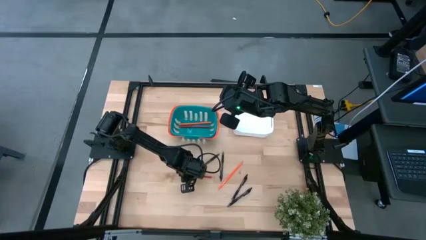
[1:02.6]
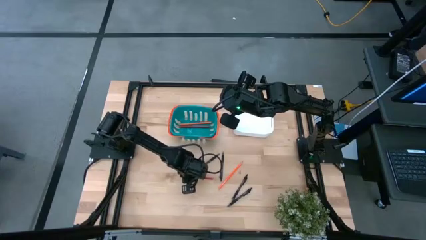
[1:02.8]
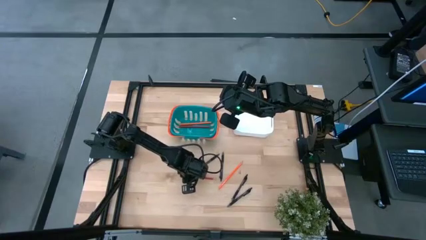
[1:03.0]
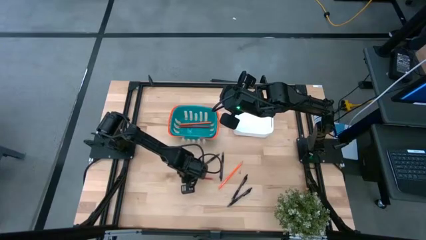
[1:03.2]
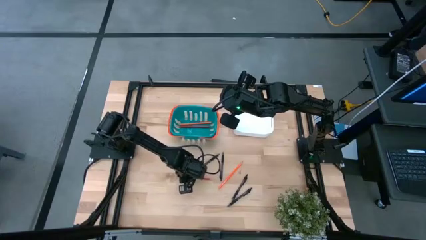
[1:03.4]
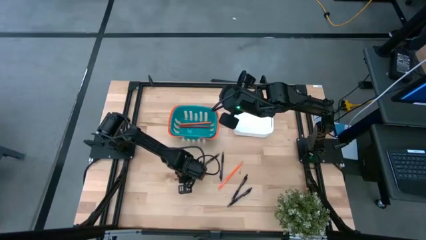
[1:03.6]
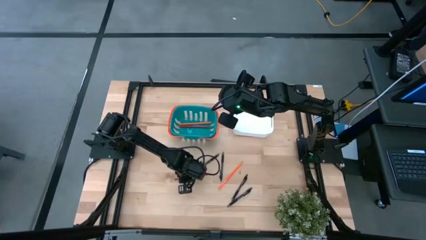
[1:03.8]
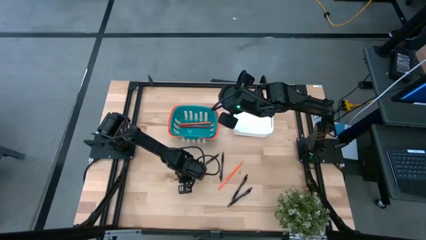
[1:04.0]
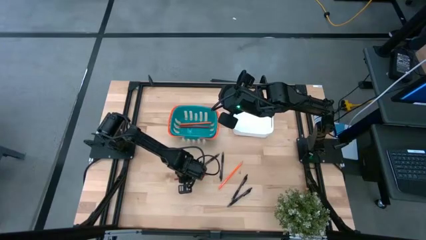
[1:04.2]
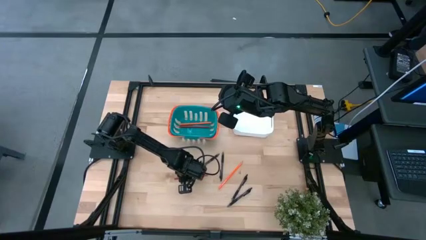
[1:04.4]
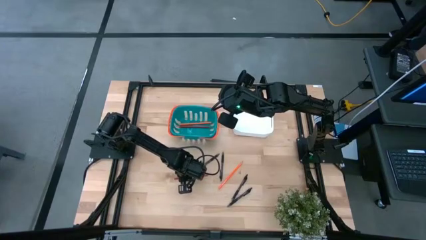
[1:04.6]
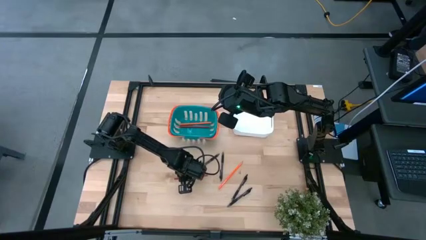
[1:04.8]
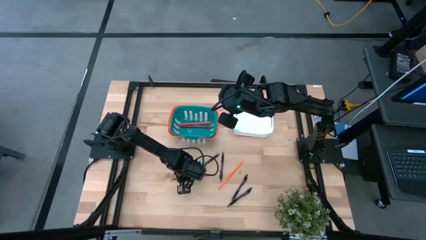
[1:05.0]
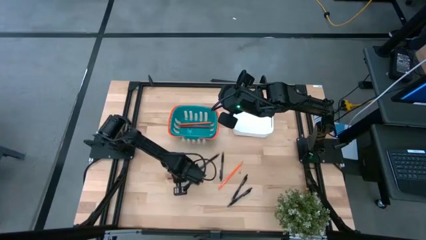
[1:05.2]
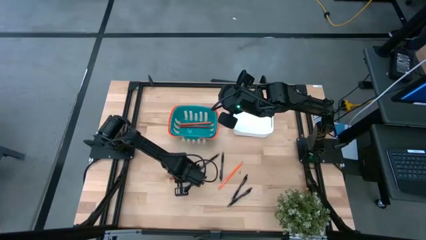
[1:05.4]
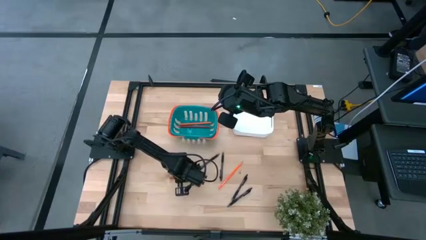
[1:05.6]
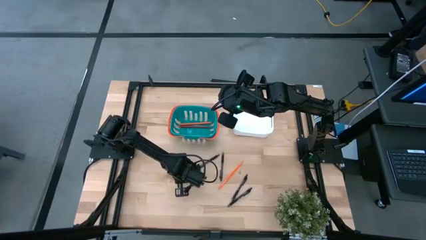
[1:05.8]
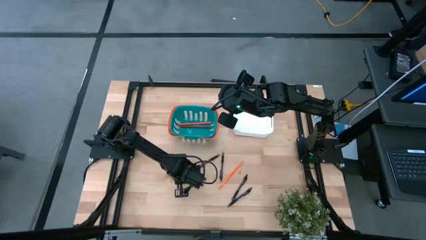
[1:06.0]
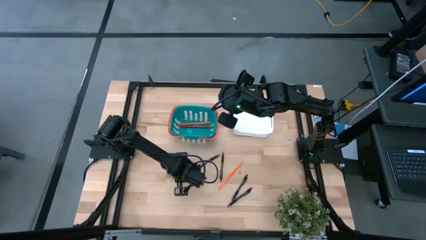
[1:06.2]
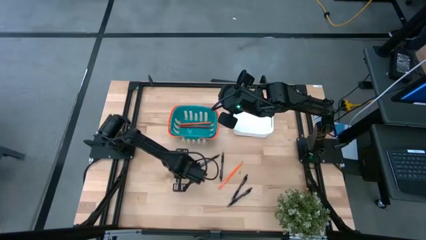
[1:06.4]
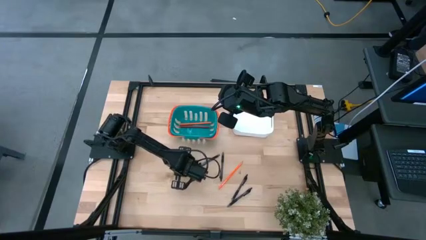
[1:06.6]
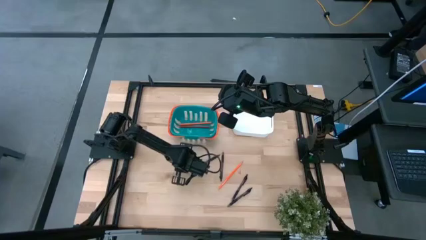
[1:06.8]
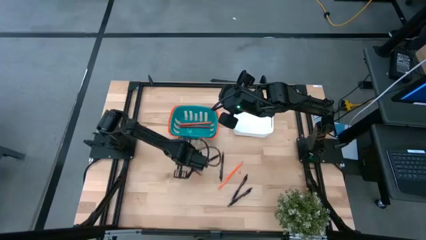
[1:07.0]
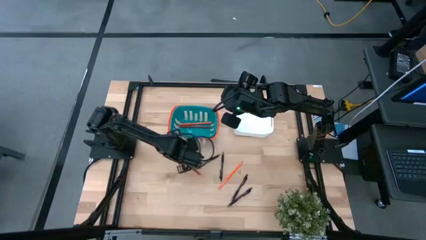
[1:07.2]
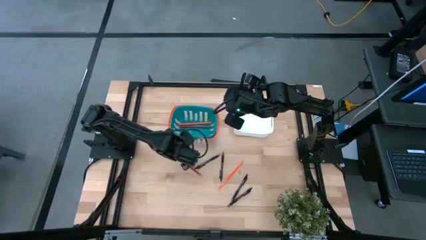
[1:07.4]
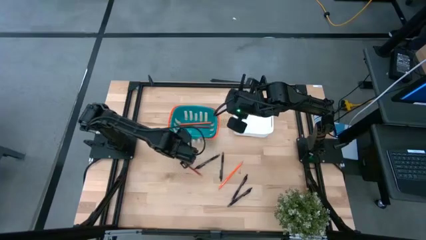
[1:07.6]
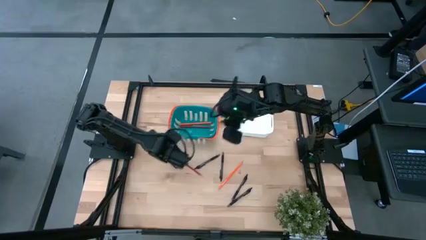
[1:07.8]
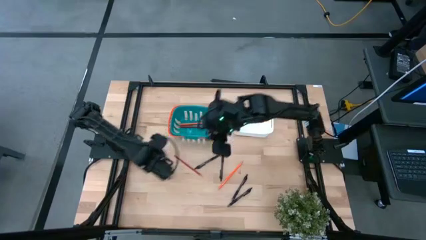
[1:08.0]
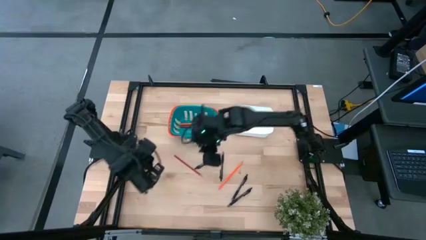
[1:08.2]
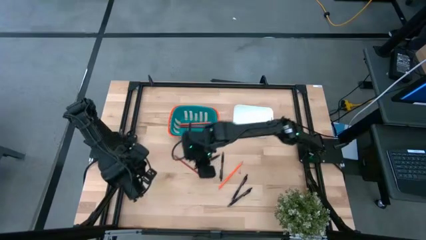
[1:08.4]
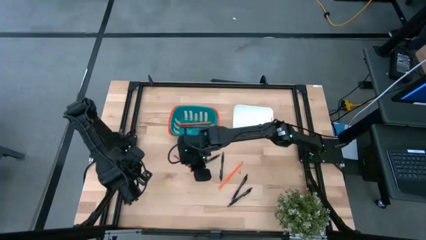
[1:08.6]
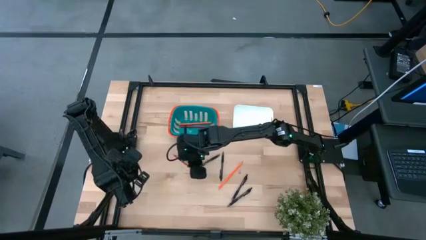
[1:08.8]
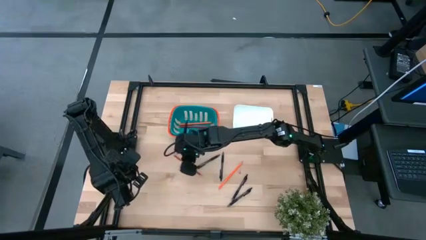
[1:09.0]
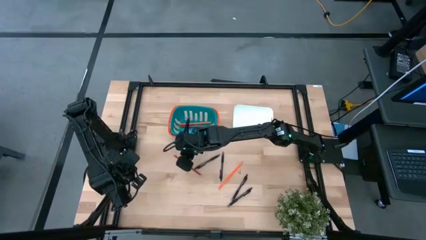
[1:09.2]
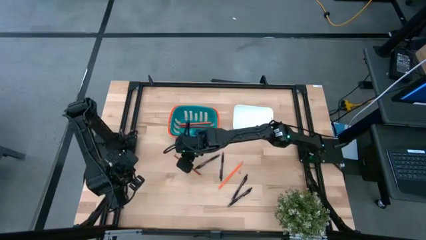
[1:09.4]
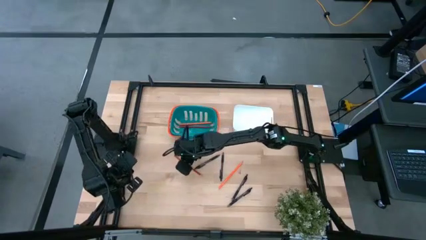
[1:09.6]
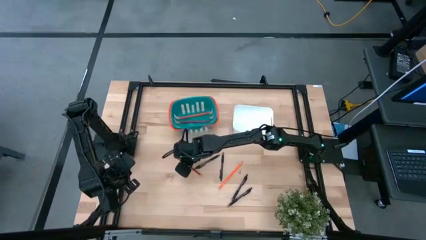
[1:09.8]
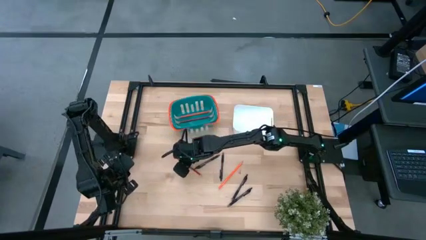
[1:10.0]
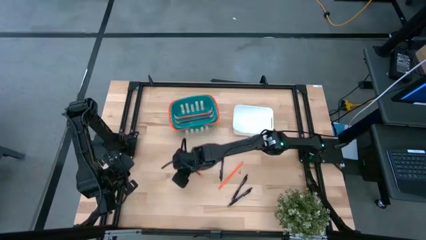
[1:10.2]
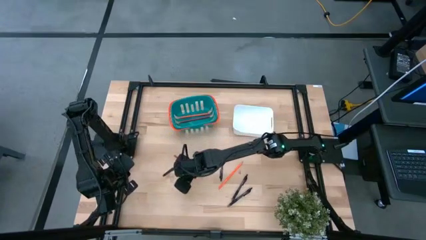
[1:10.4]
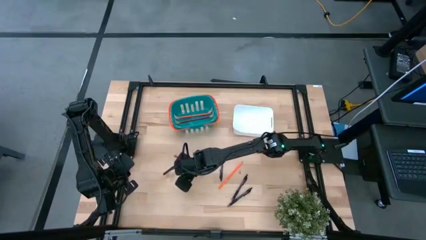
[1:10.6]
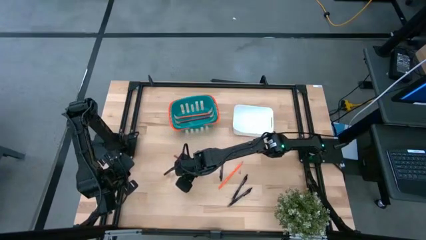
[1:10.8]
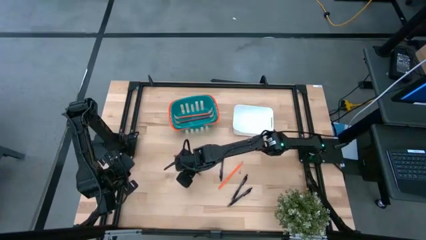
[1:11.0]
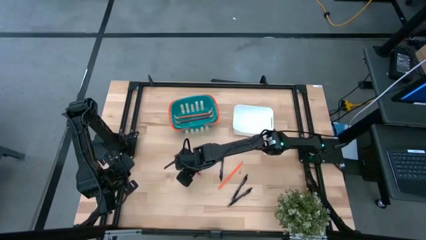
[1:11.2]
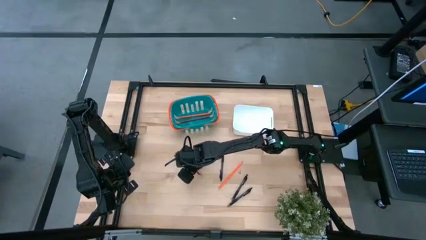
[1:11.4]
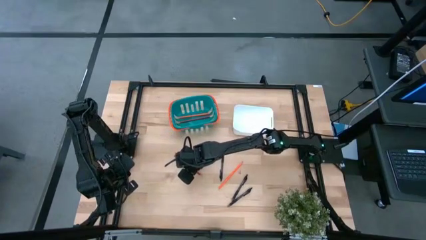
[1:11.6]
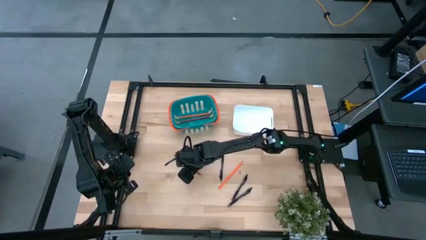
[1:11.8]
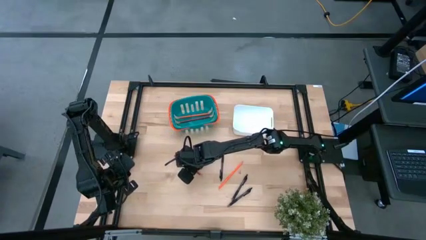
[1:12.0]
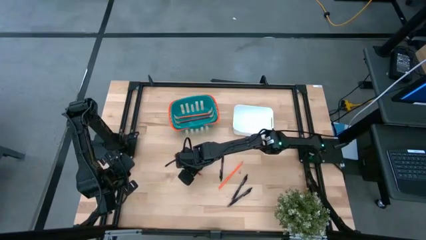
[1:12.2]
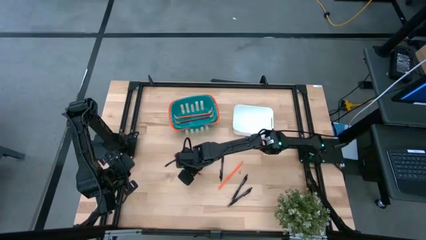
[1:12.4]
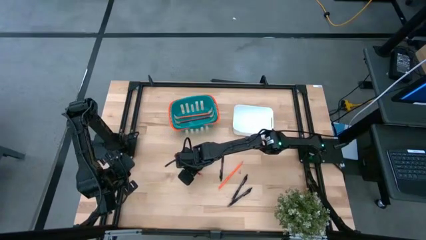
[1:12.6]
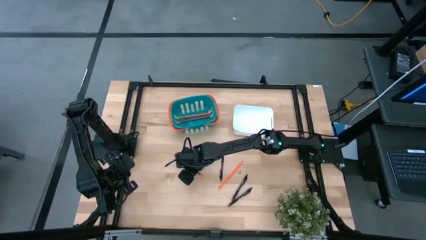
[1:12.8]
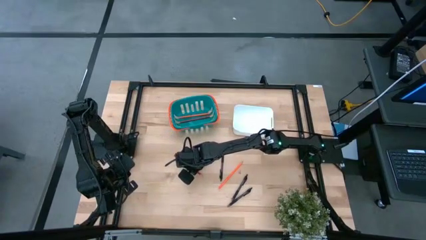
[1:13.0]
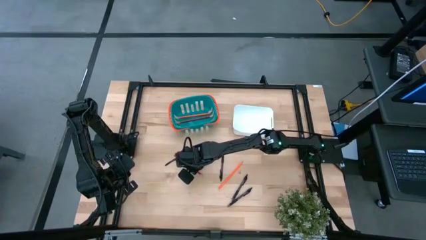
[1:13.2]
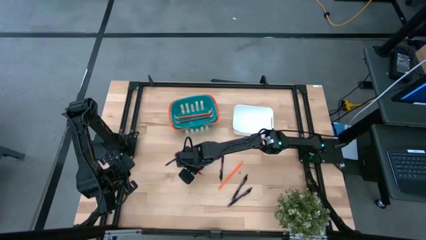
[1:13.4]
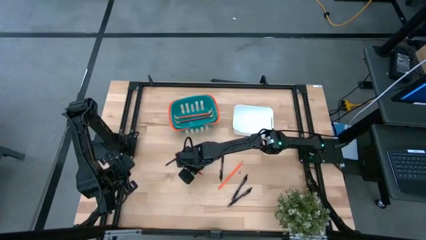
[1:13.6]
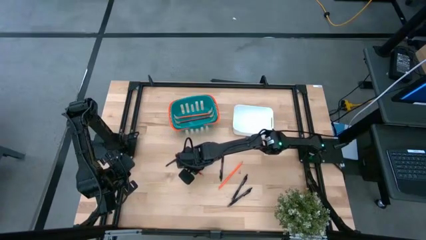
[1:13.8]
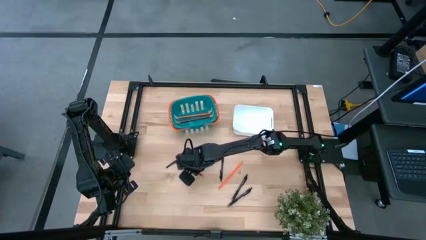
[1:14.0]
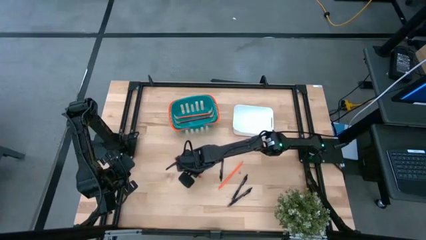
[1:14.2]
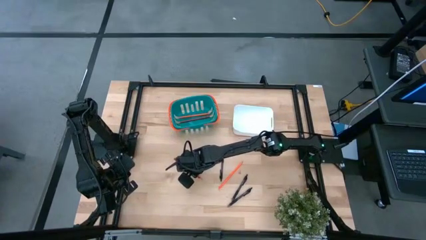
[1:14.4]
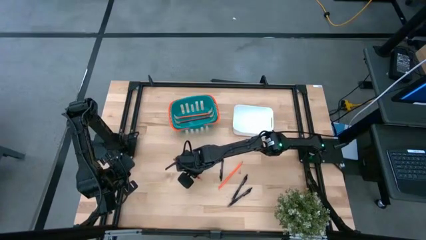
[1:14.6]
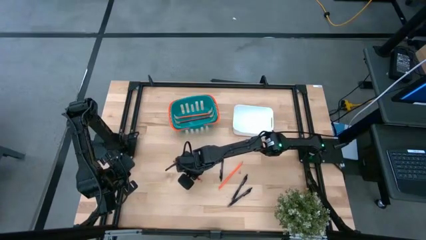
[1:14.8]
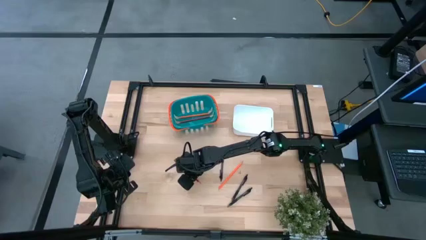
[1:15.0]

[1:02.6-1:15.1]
Task: Sort pens & pencils
Put the red pencil into the blue bin

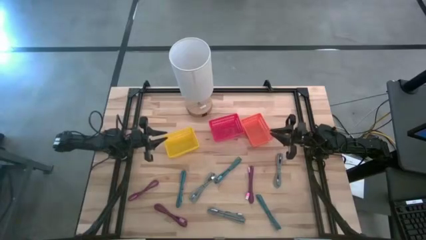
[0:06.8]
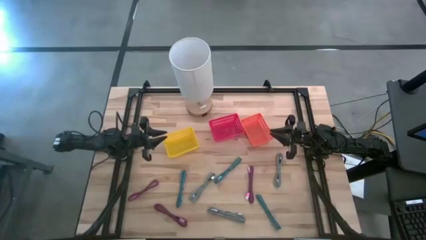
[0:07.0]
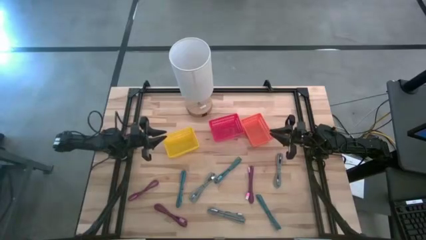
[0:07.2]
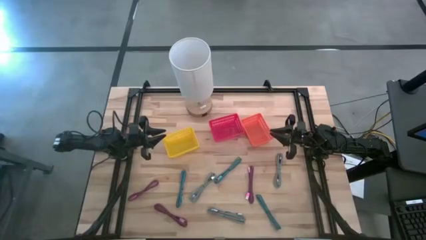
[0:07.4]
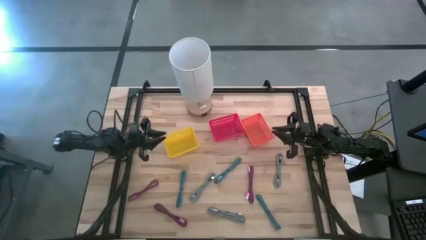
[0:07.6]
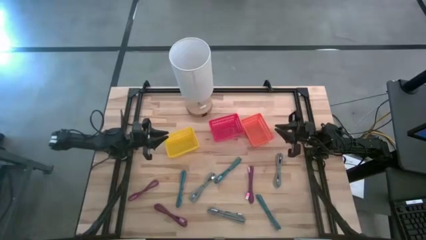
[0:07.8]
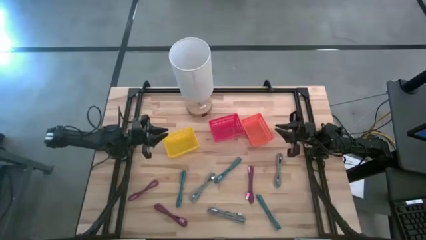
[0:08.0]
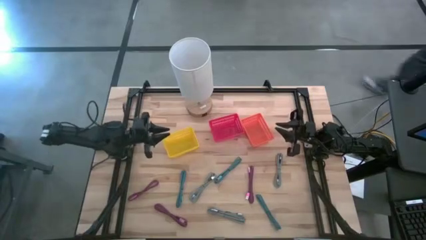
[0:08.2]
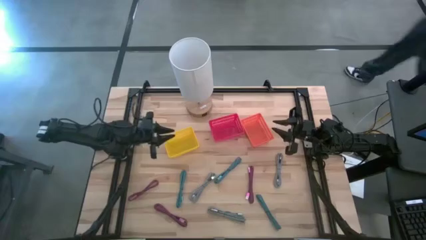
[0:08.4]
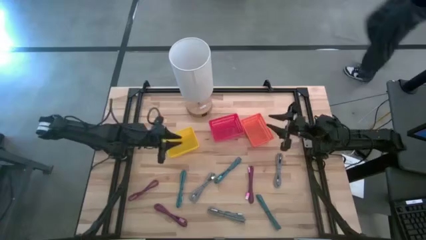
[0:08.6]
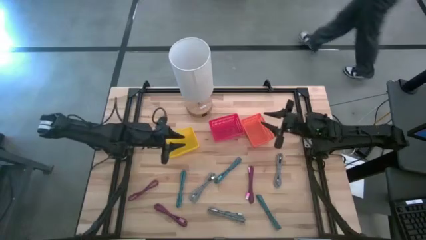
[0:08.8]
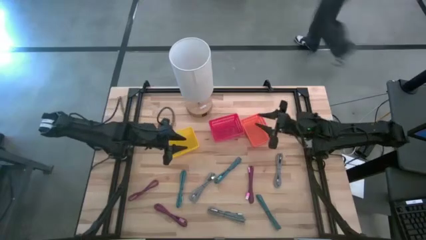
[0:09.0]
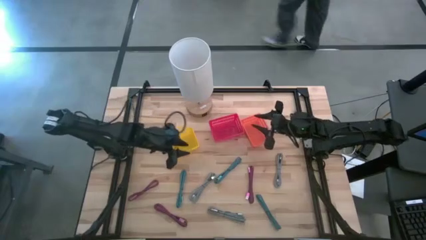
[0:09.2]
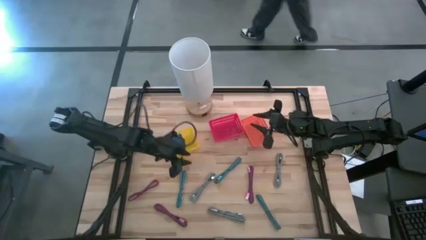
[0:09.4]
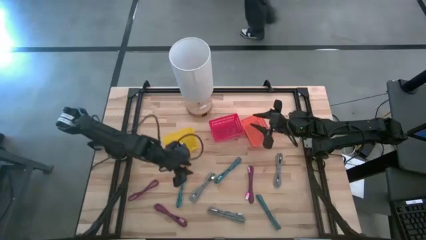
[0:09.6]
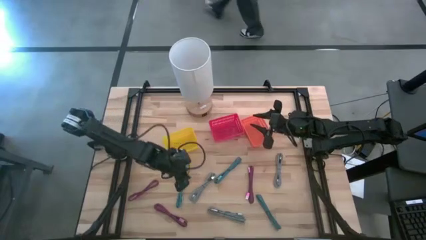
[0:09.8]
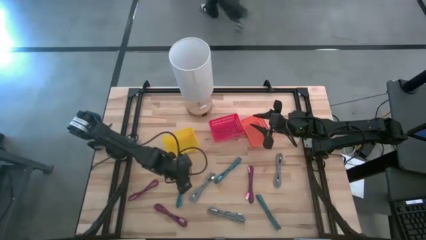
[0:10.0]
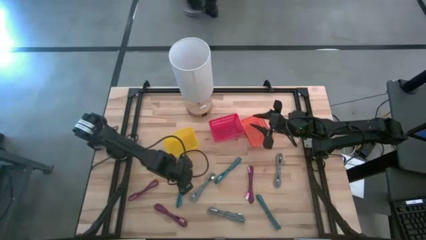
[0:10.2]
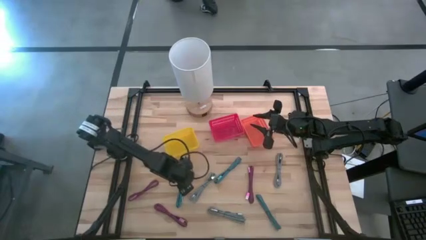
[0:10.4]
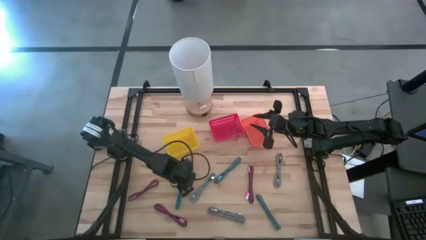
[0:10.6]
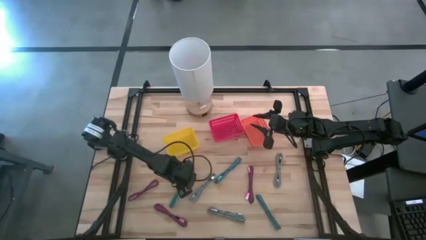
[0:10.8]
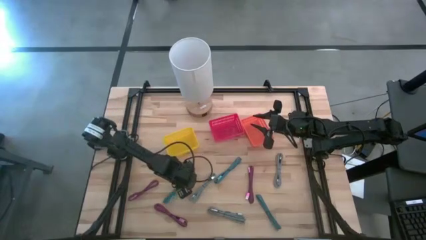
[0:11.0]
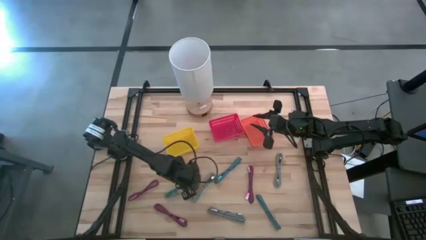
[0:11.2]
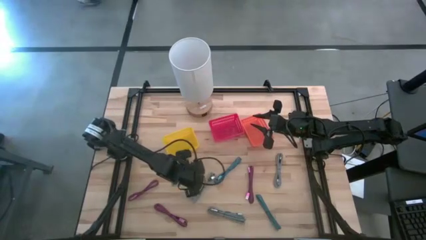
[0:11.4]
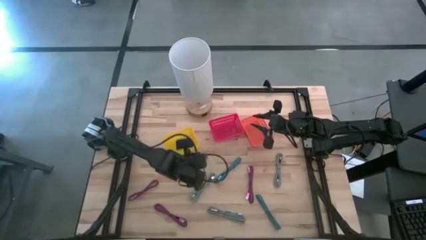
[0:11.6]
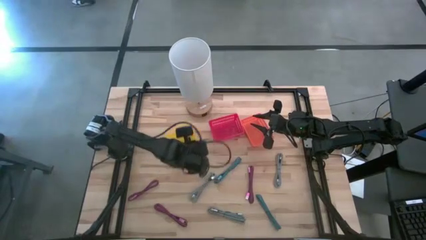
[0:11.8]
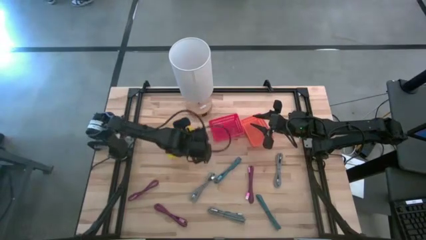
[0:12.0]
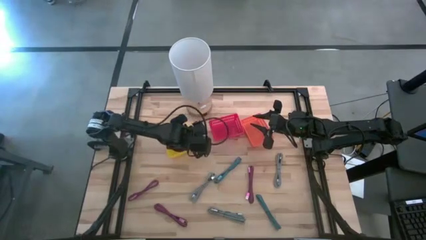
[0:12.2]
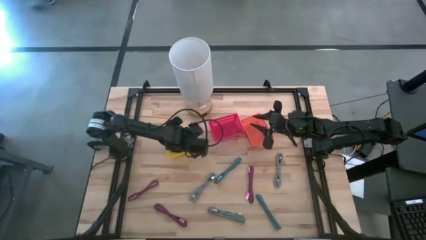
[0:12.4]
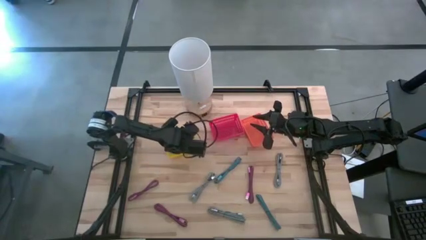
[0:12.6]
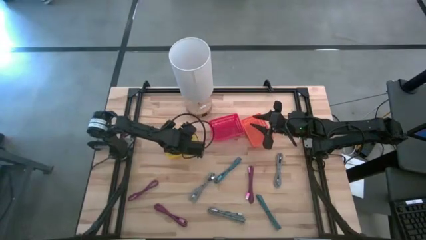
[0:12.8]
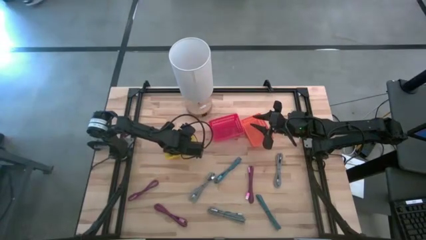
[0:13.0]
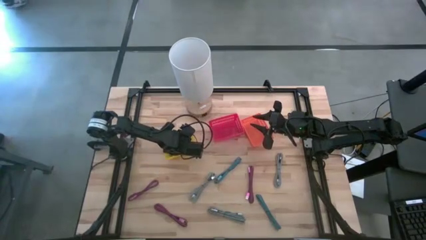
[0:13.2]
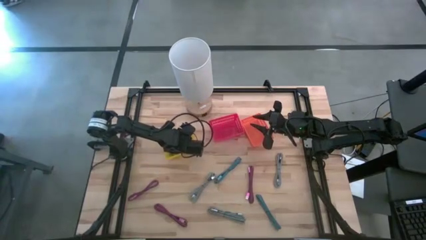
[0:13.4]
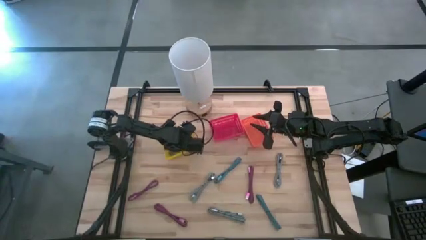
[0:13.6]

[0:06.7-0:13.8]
Task: Pick & Place USB Port
Put the top left blue charger cable into the yellow bin
